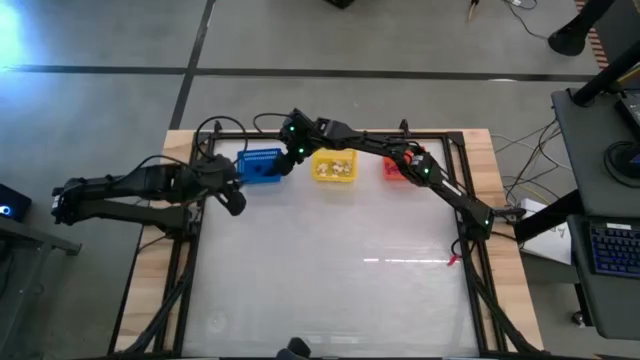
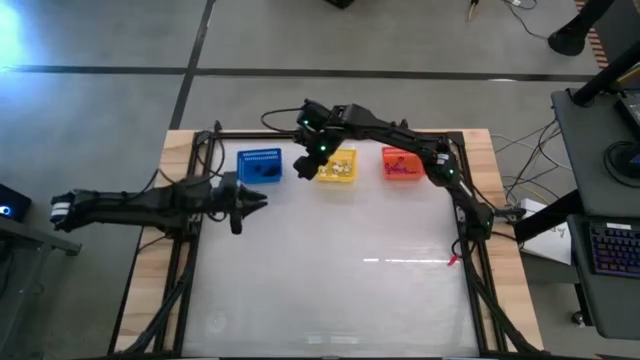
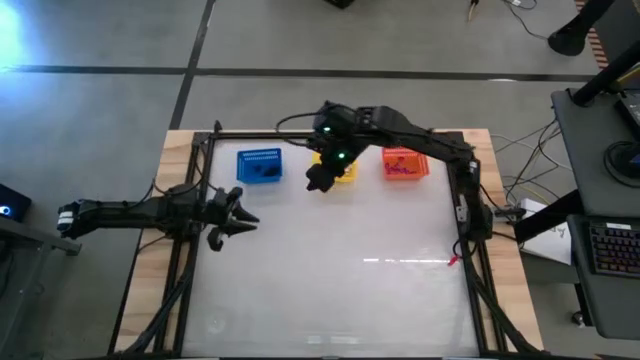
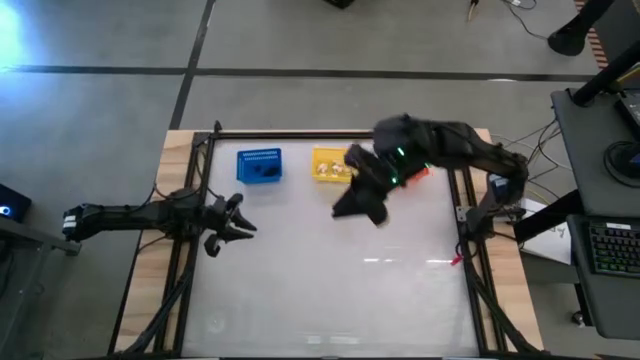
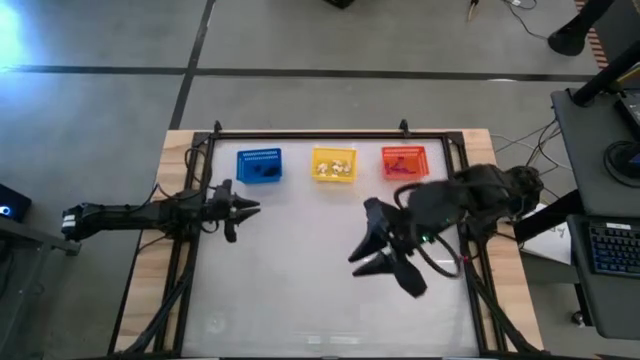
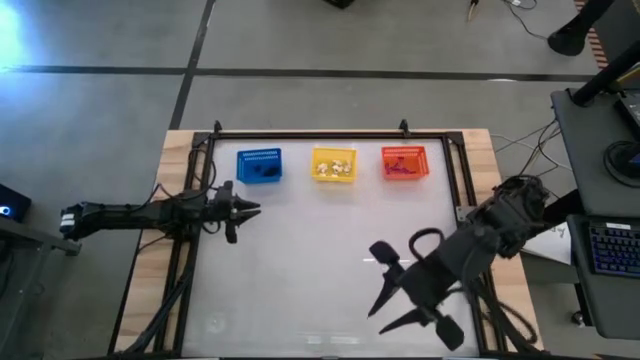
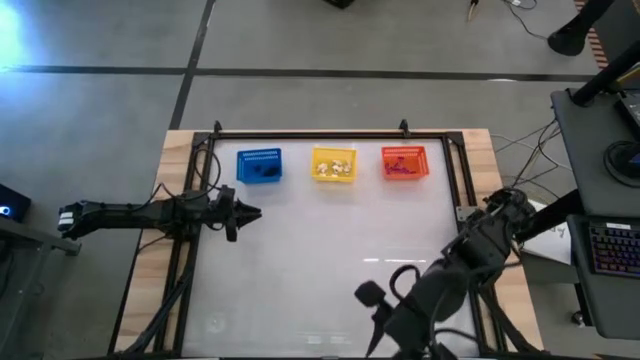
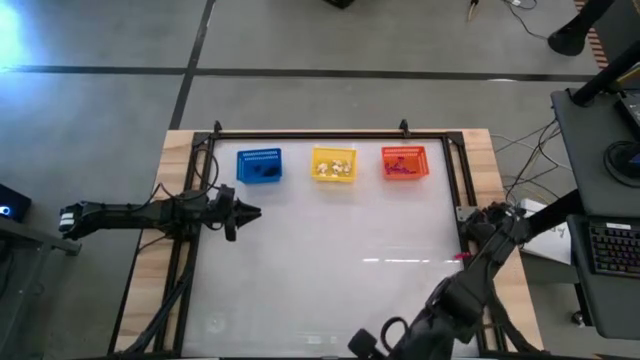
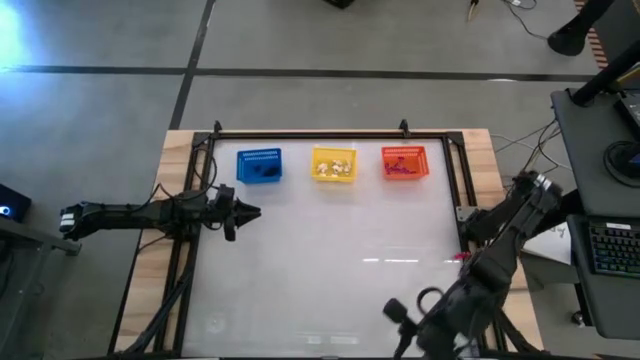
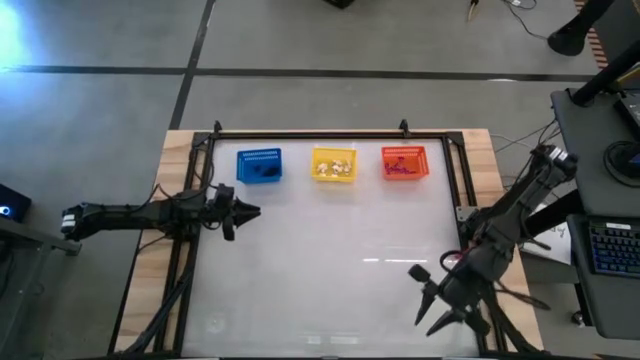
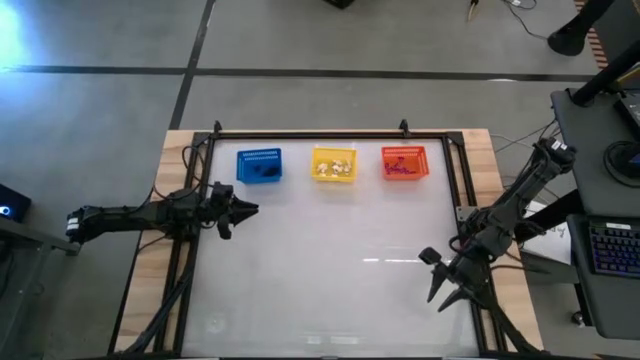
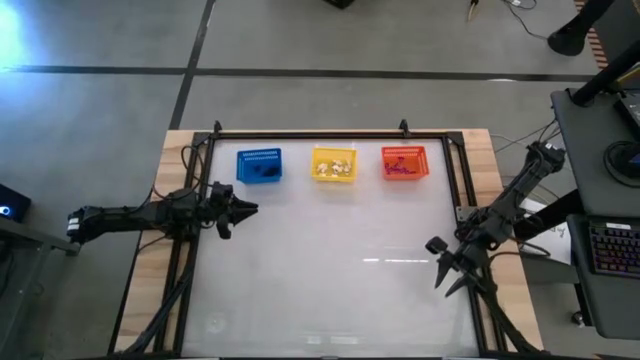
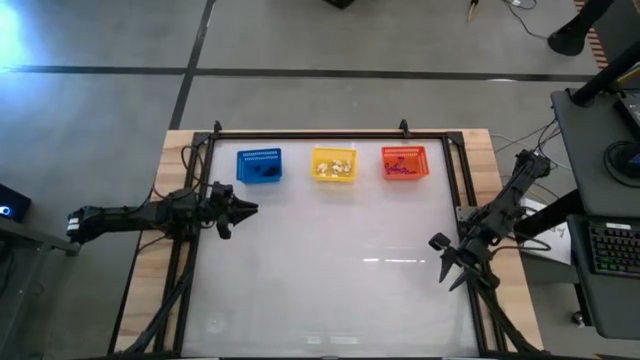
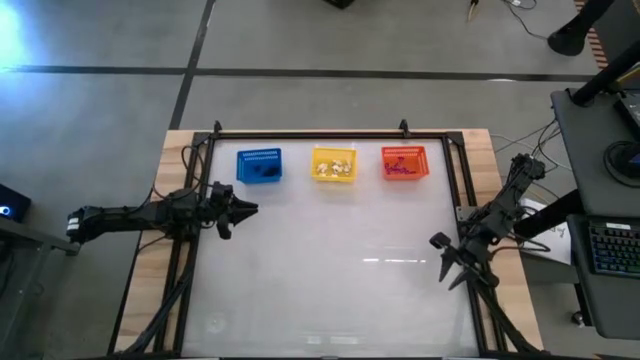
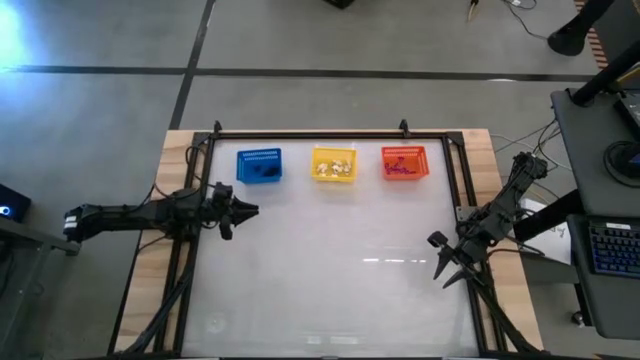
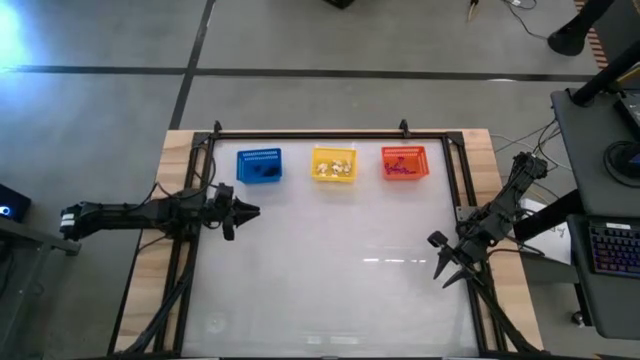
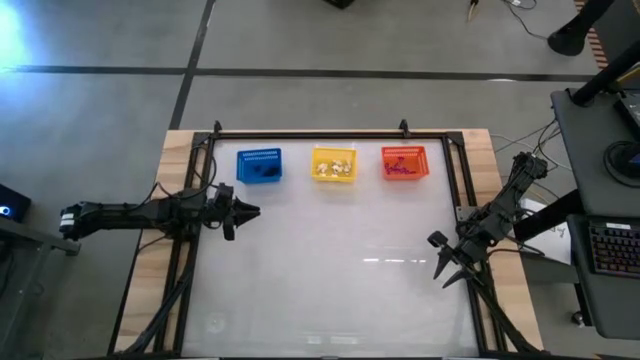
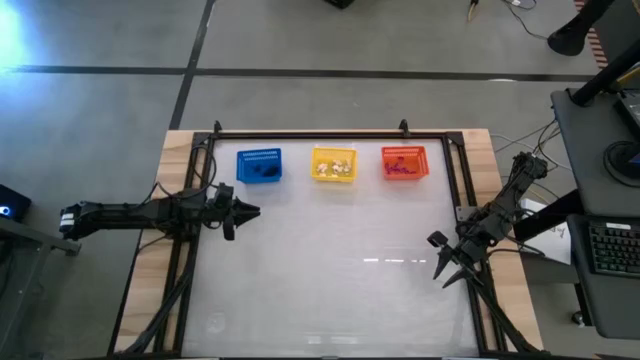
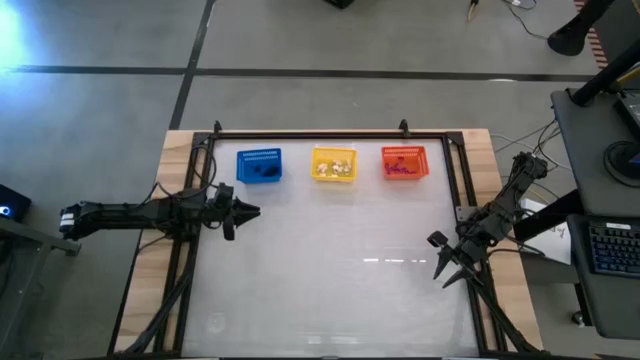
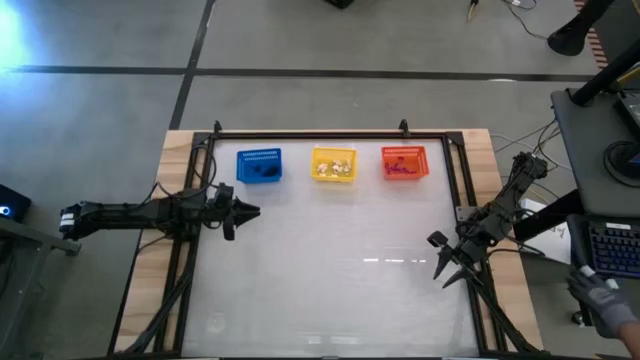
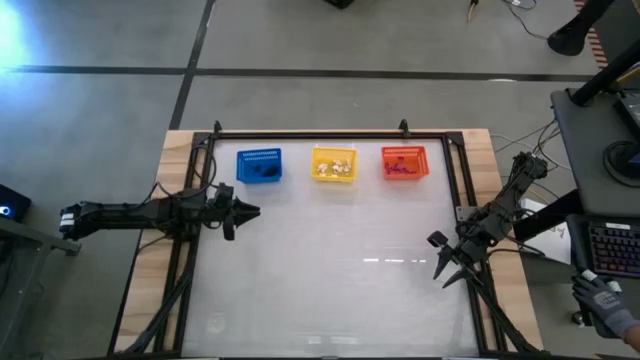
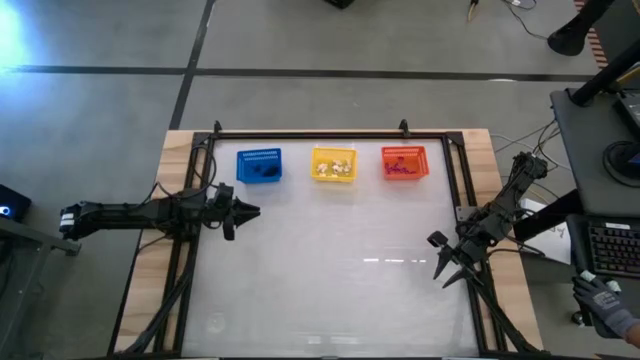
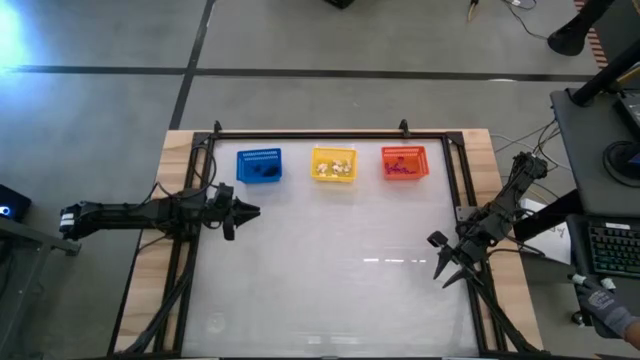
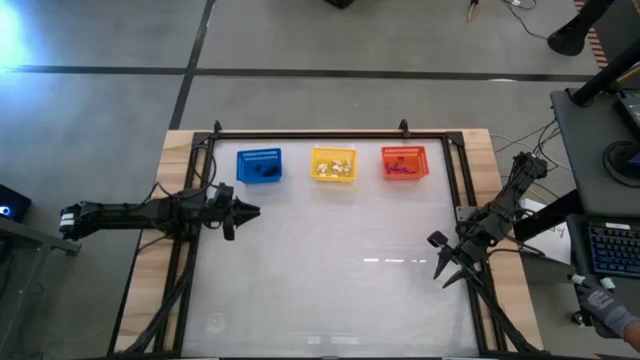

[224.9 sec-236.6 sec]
Task: Sort Halloween decoration
Return to Home Position

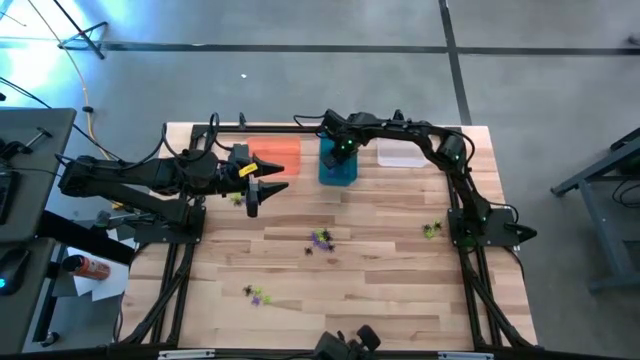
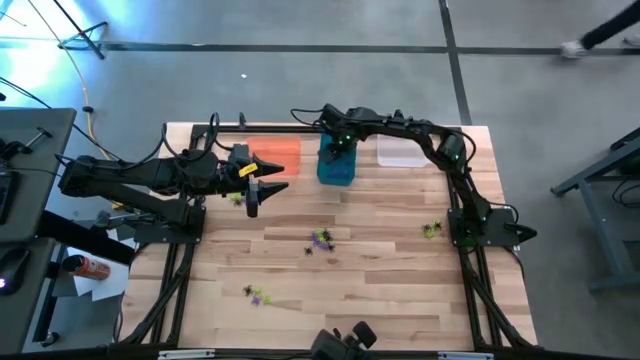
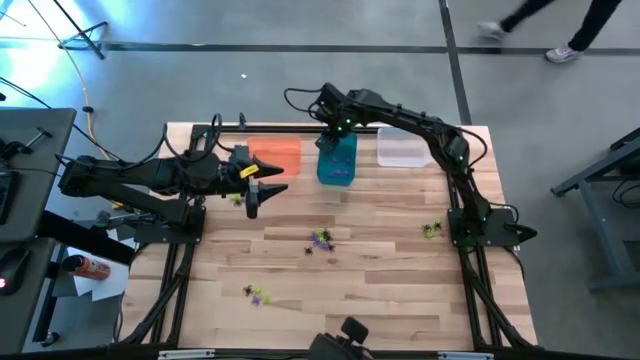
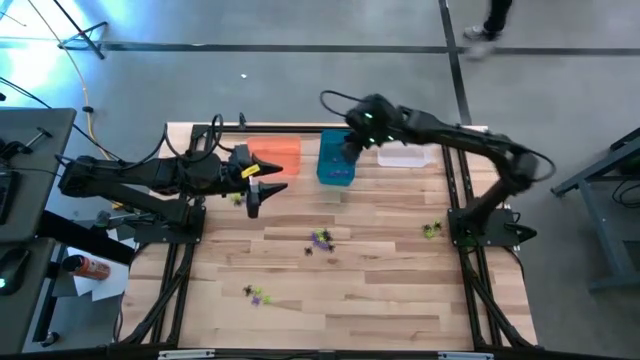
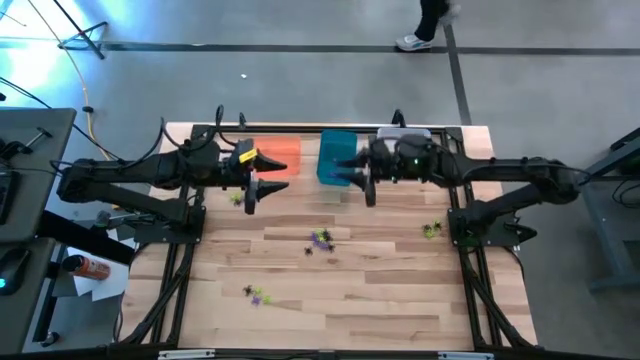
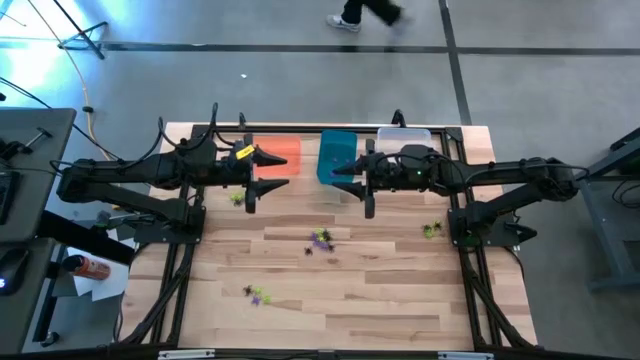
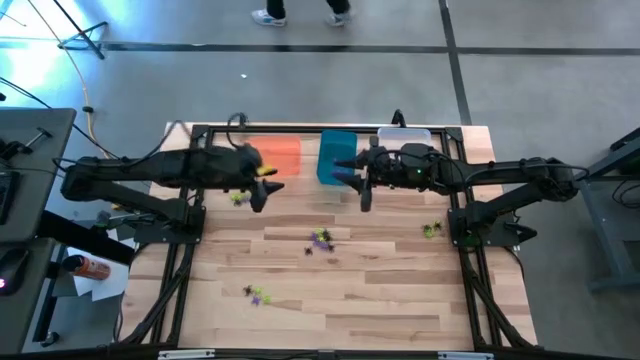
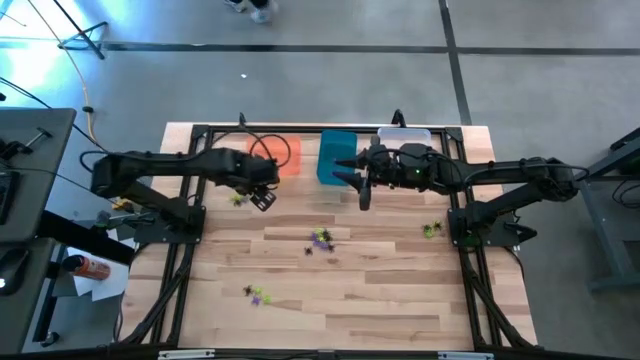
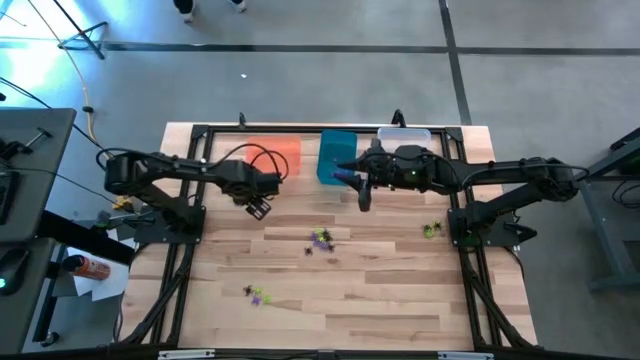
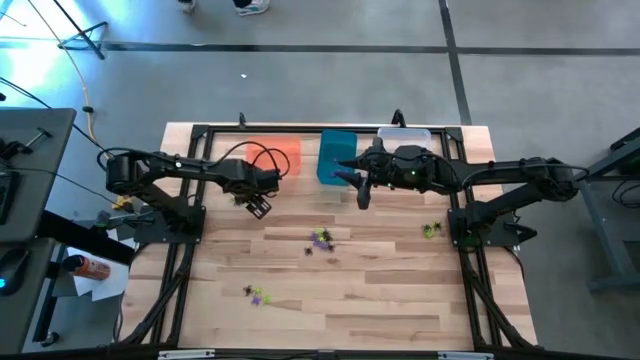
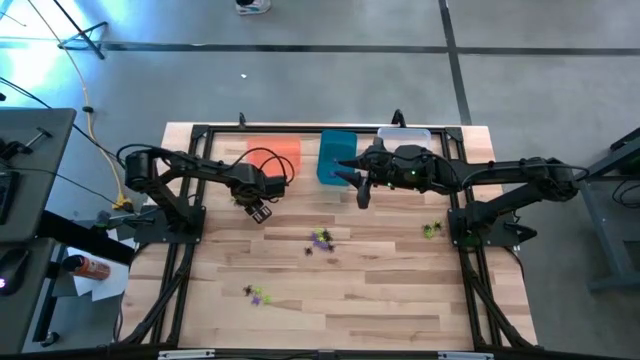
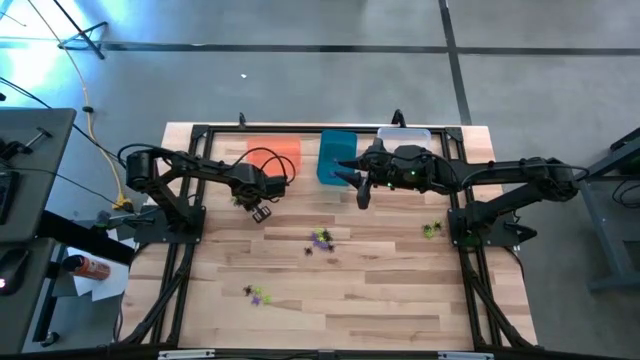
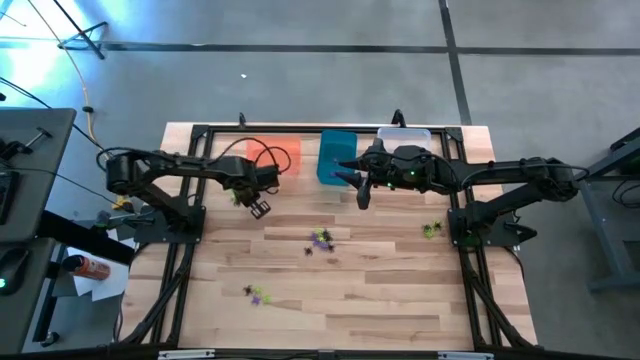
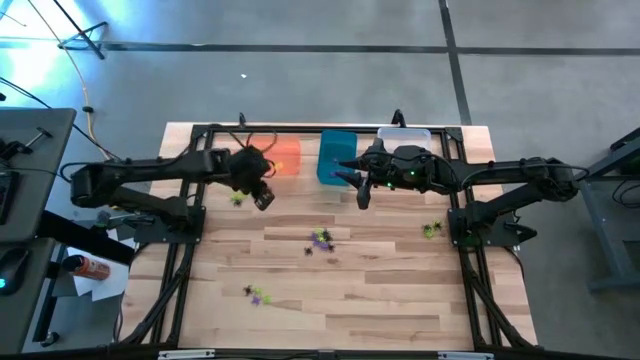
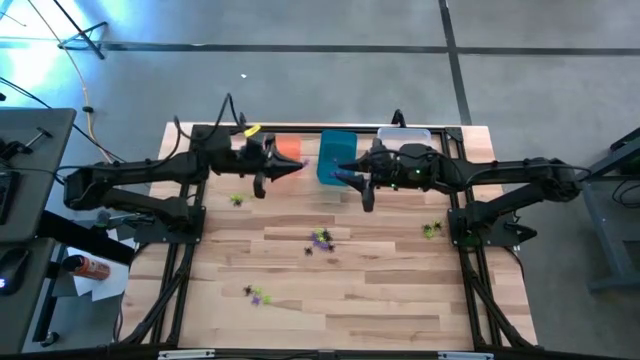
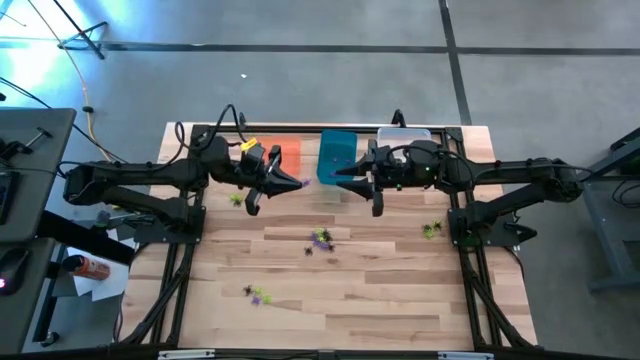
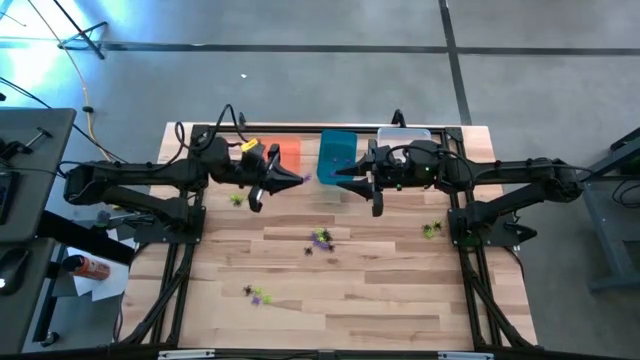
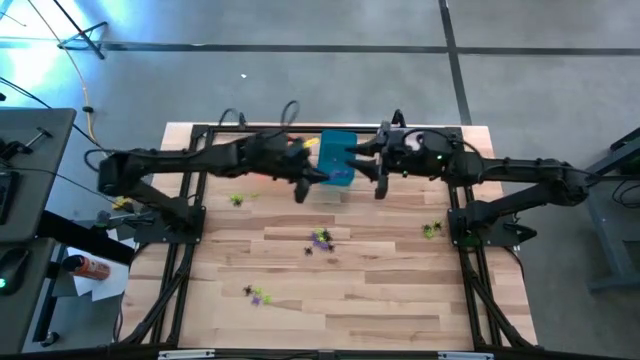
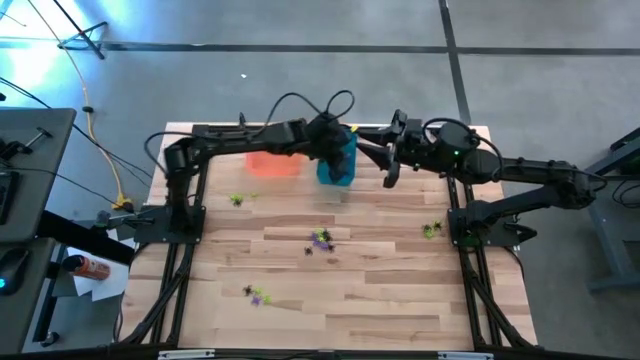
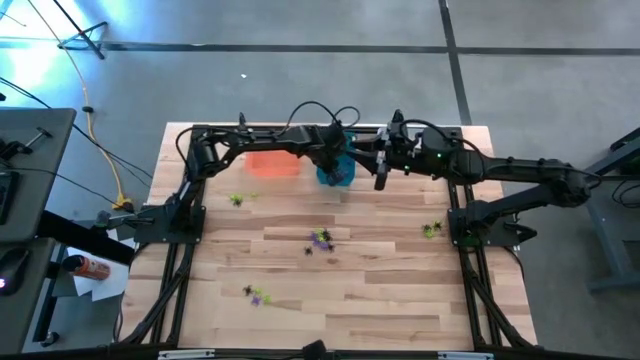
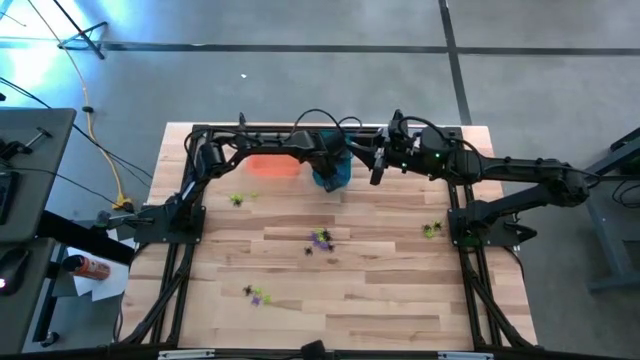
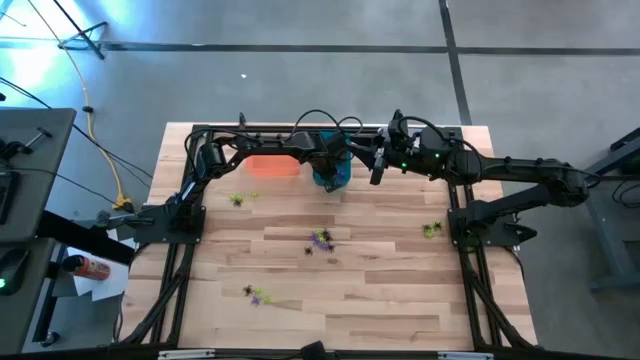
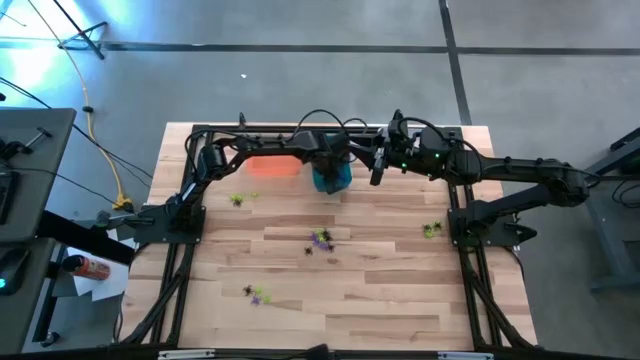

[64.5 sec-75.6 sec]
Task: Sort Halloween decoration
Put the purple spider toy into the blue bin
